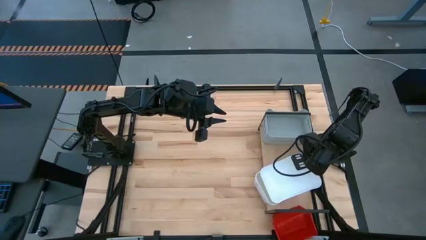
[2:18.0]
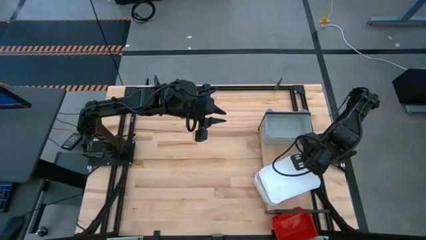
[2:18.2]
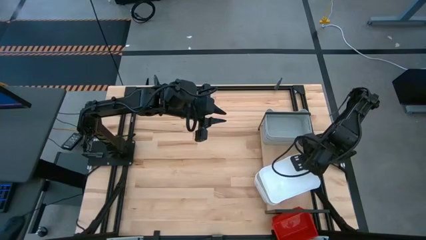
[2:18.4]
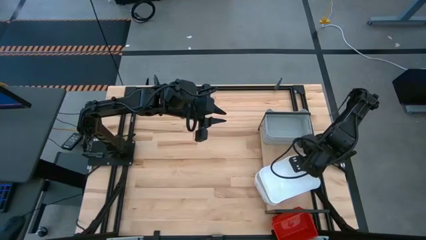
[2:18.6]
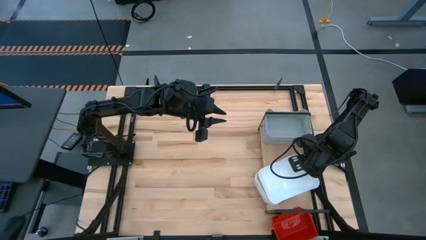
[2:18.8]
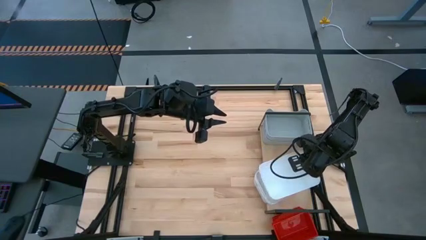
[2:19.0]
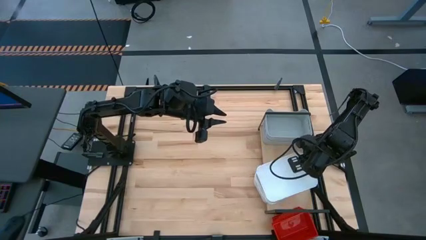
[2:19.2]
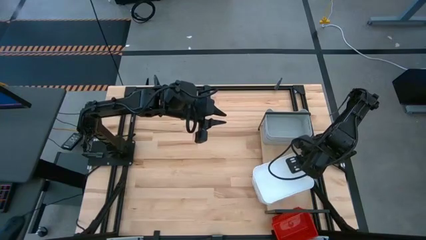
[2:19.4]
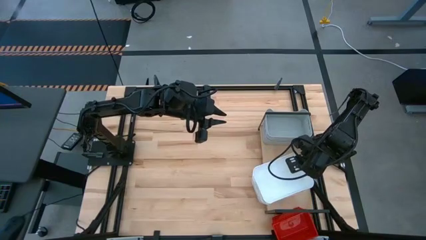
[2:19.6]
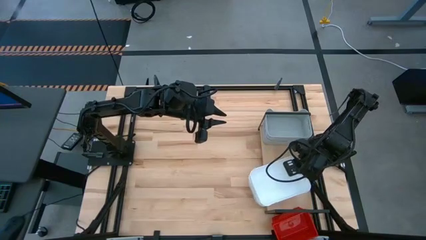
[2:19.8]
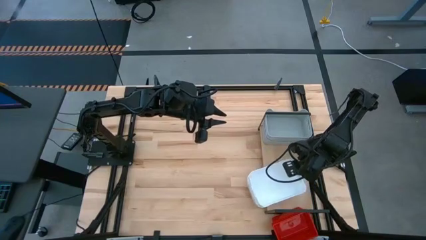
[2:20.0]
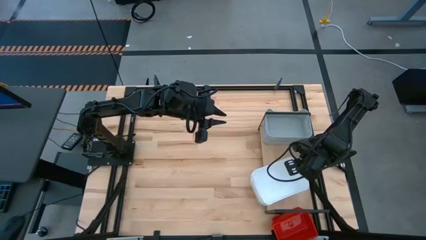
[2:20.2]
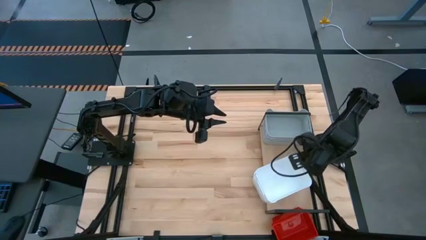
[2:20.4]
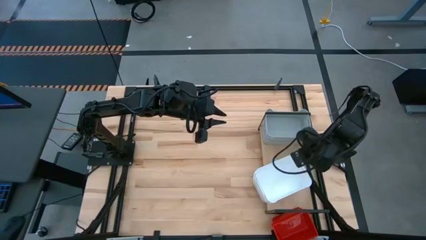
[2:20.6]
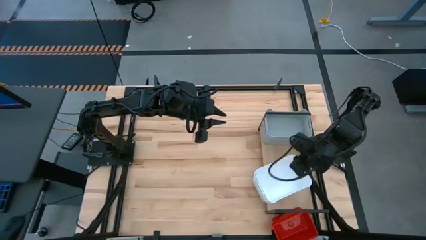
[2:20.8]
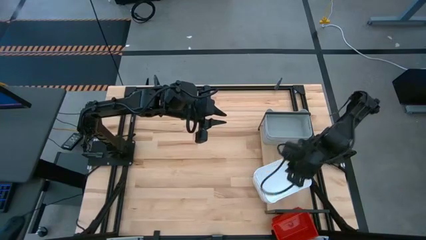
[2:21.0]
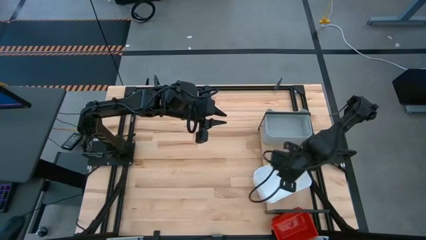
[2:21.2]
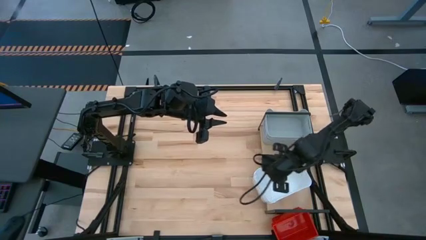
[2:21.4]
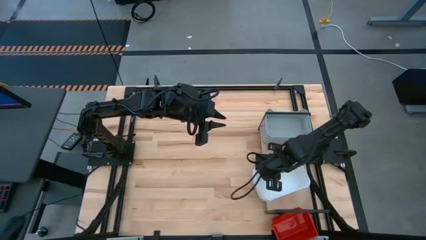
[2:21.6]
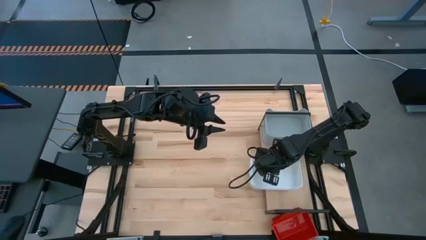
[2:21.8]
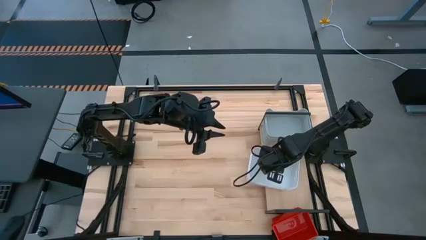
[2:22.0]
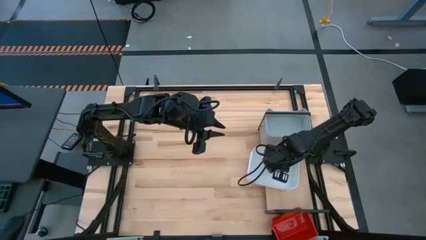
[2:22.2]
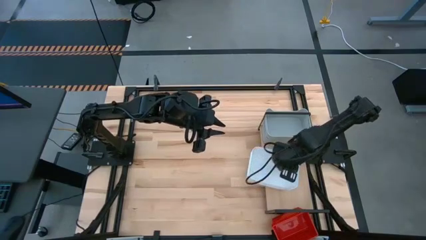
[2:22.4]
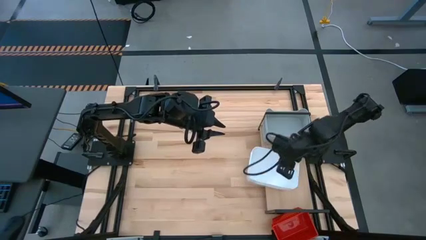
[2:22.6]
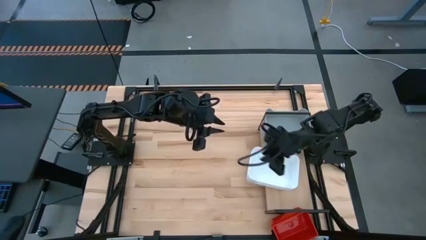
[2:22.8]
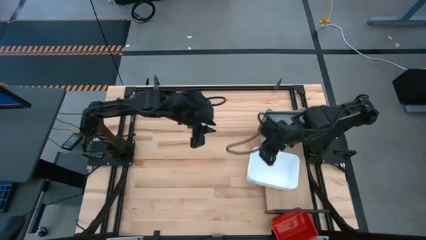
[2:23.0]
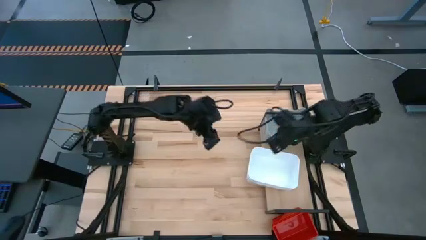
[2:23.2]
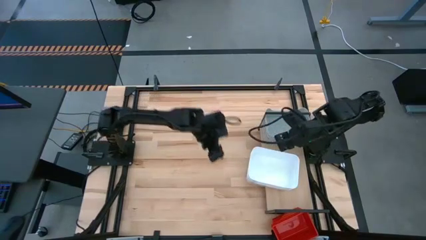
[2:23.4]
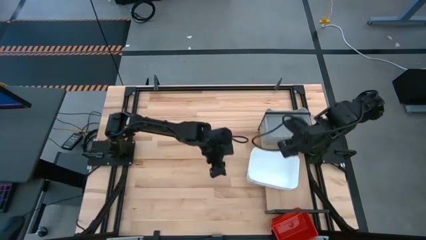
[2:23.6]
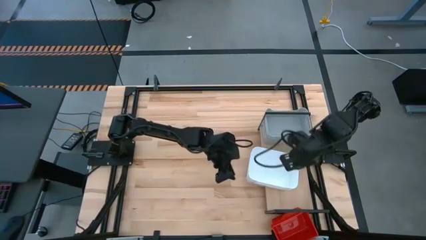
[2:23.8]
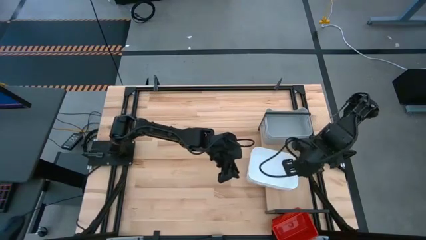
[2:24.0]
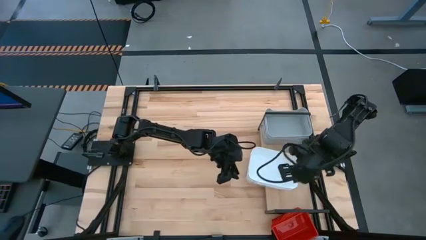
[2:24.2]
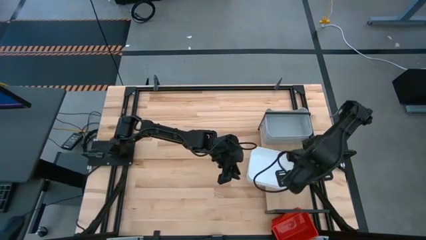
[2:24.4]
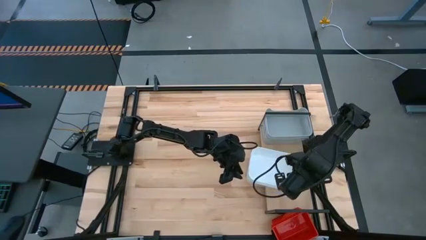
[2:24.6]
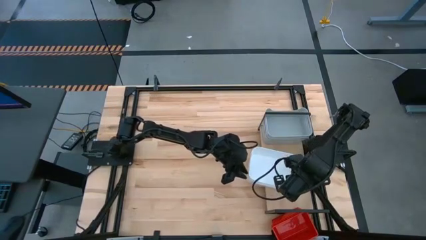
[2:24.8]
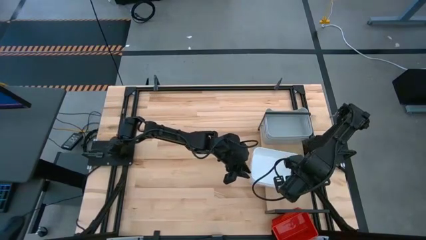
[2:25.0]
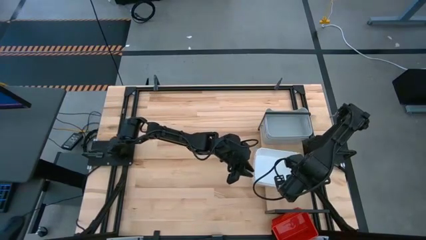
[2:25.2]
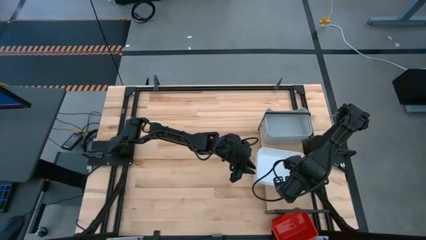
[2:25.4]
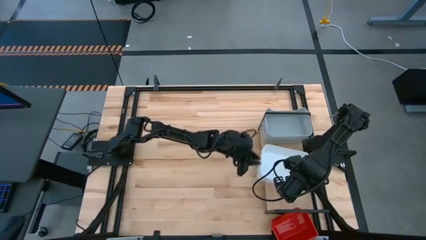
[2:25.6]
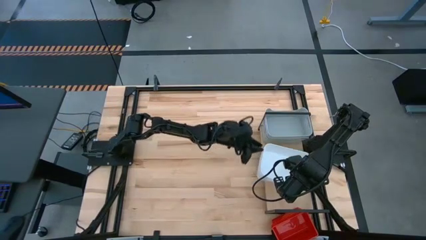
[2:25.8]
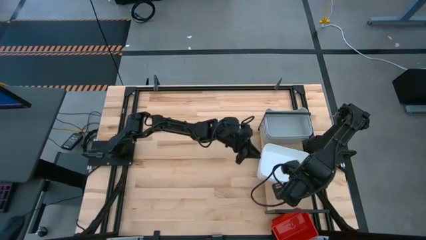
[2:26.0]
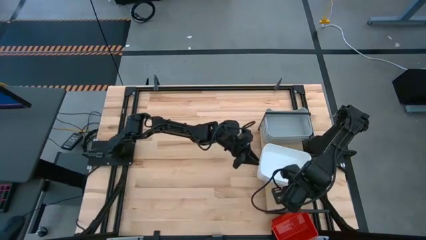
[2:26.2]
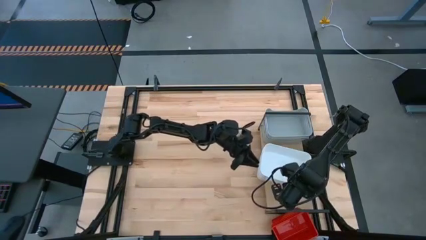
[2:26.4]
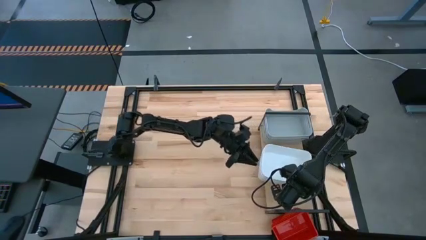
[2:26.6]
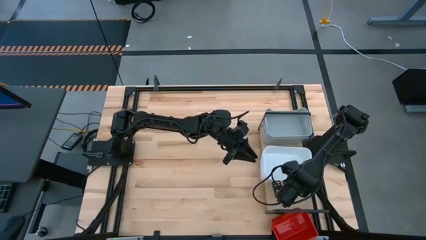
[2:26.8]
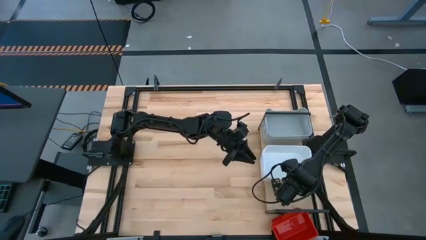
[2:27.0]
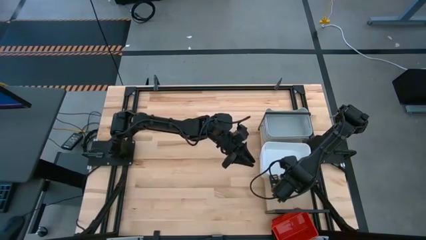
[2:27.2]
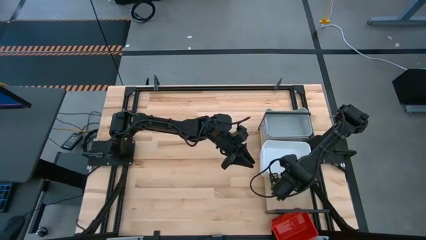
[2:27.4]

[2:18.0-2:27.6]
Task: Stack baskets on shelf by color
Stack the white bin on top of the white bin on the shelf
